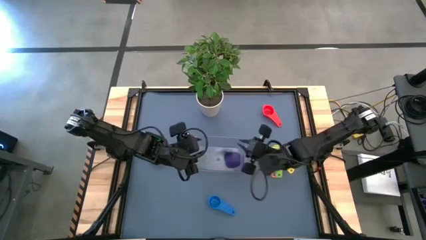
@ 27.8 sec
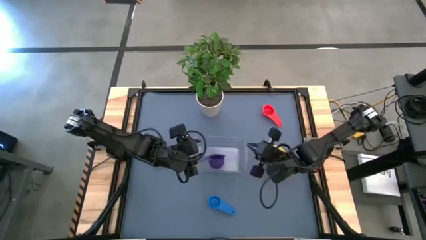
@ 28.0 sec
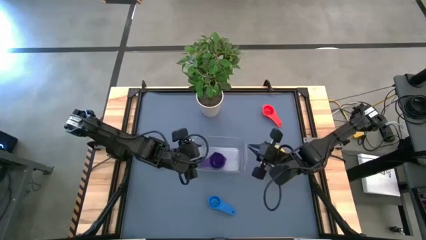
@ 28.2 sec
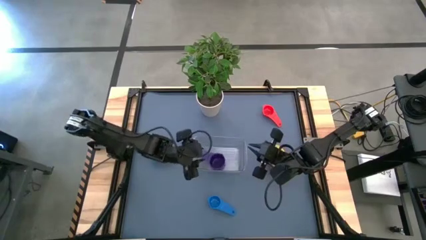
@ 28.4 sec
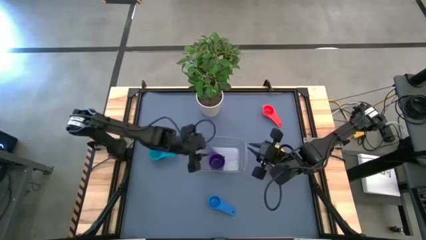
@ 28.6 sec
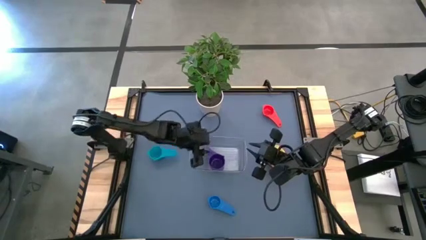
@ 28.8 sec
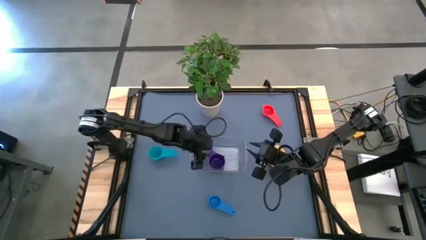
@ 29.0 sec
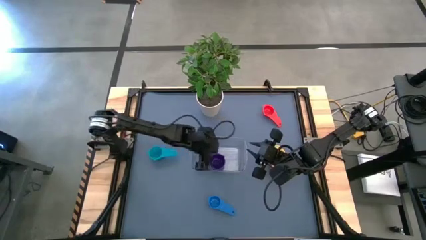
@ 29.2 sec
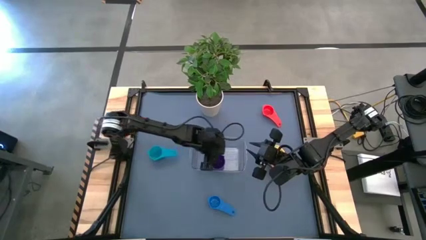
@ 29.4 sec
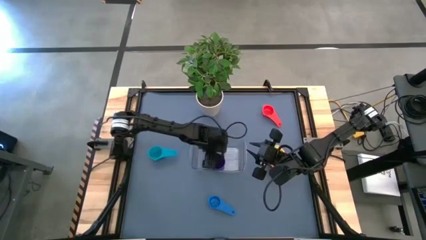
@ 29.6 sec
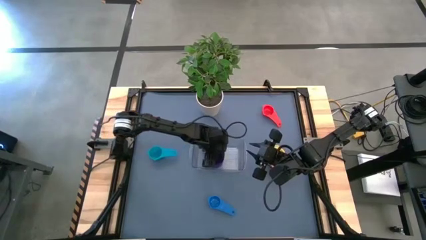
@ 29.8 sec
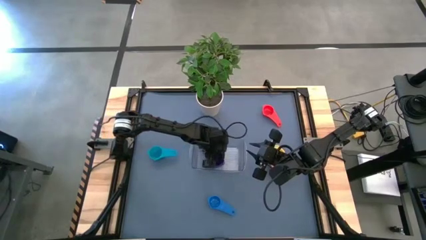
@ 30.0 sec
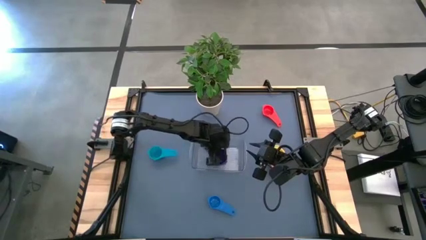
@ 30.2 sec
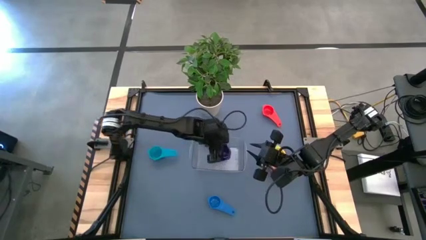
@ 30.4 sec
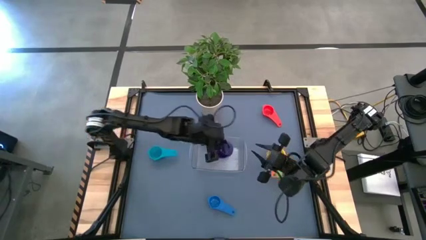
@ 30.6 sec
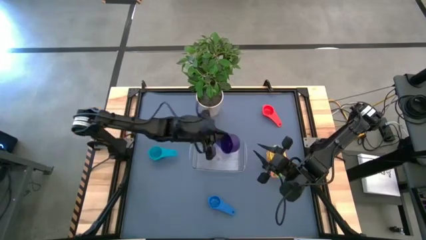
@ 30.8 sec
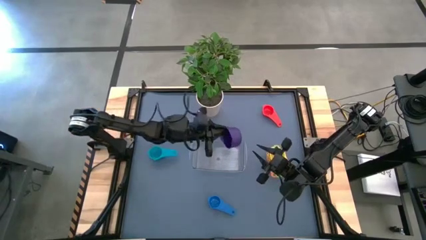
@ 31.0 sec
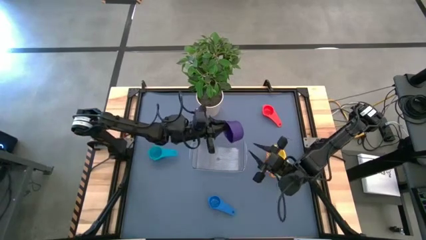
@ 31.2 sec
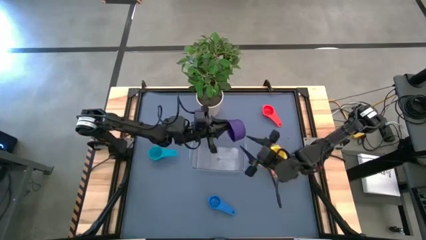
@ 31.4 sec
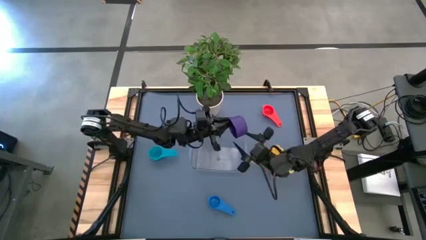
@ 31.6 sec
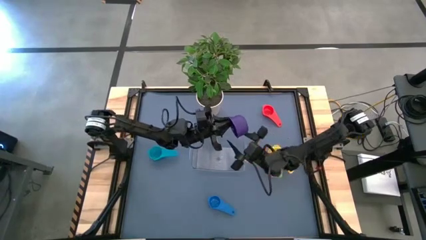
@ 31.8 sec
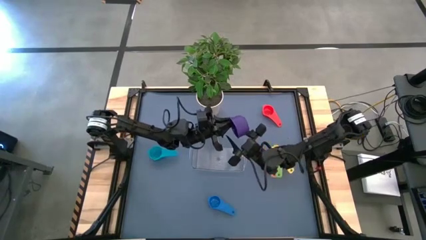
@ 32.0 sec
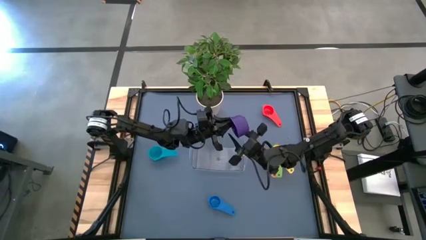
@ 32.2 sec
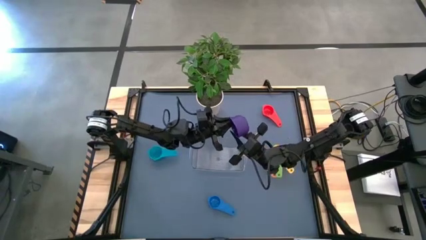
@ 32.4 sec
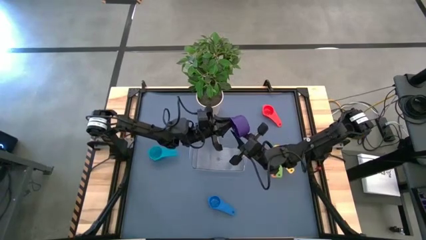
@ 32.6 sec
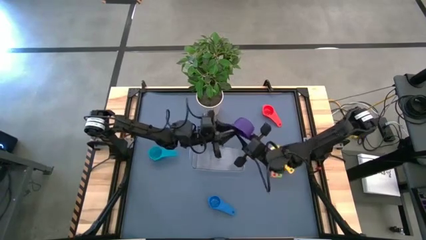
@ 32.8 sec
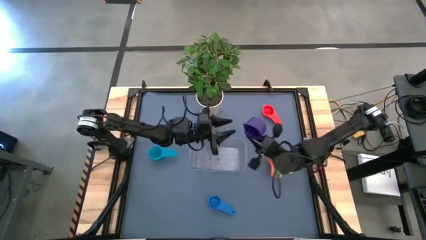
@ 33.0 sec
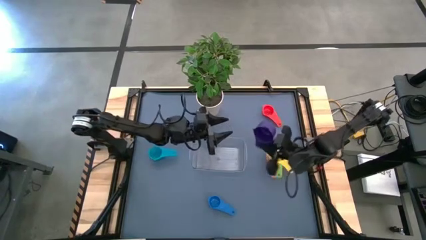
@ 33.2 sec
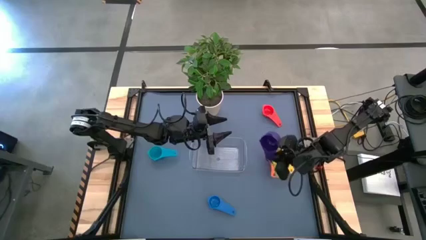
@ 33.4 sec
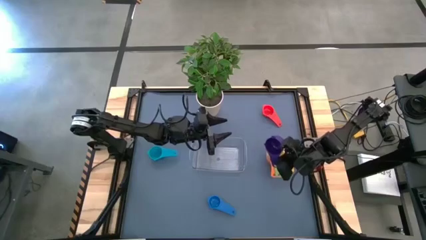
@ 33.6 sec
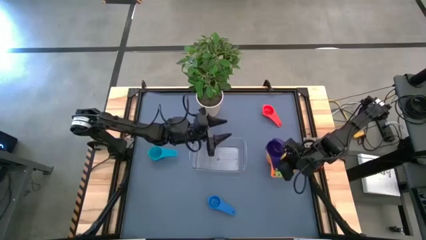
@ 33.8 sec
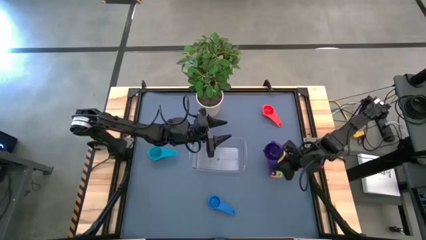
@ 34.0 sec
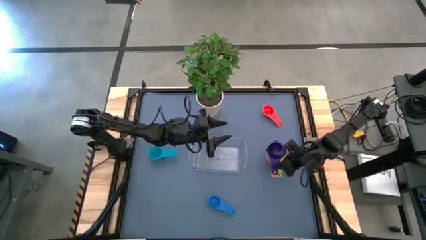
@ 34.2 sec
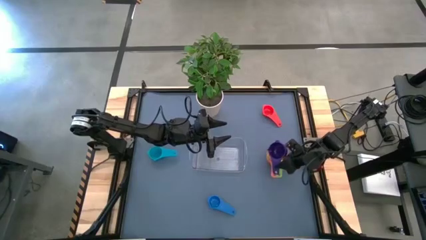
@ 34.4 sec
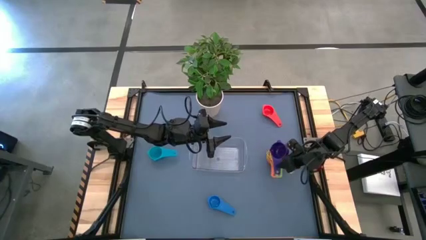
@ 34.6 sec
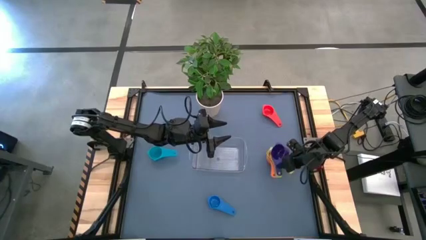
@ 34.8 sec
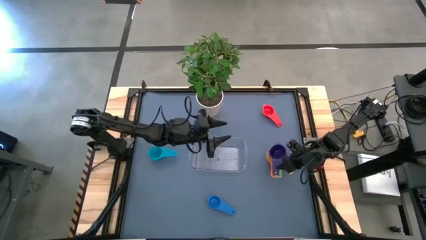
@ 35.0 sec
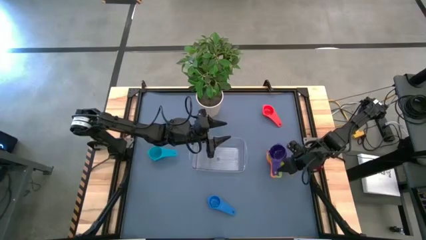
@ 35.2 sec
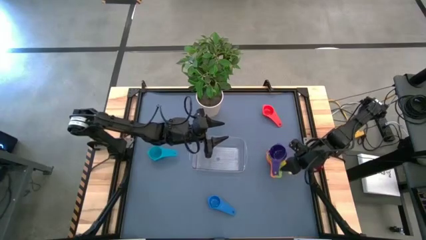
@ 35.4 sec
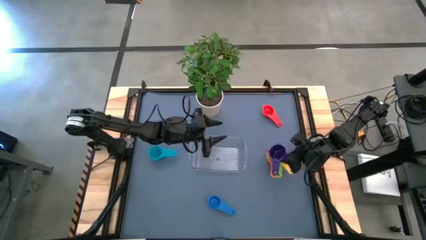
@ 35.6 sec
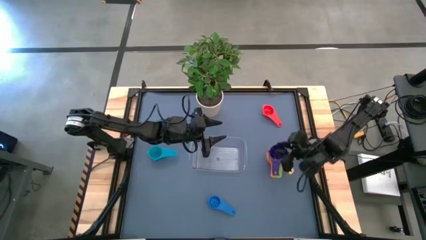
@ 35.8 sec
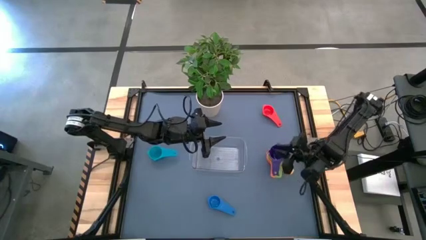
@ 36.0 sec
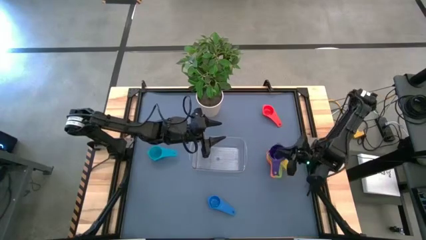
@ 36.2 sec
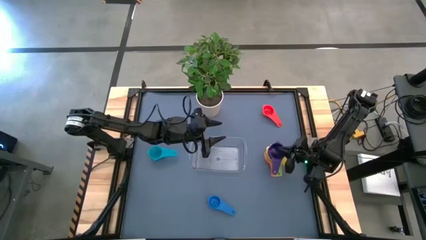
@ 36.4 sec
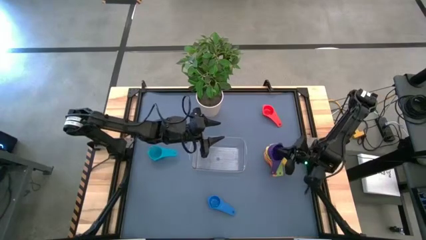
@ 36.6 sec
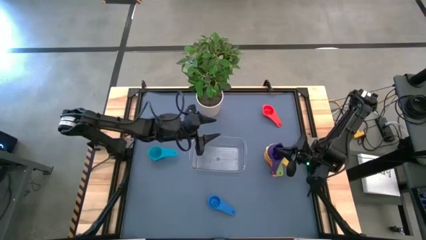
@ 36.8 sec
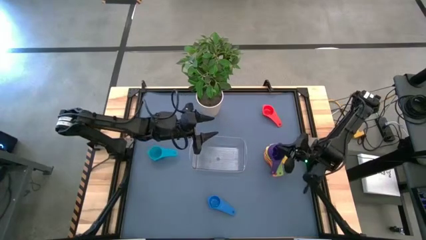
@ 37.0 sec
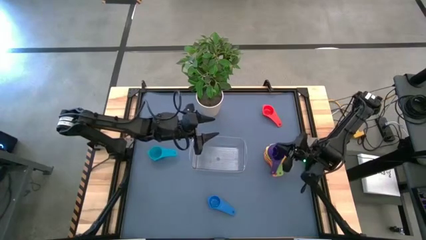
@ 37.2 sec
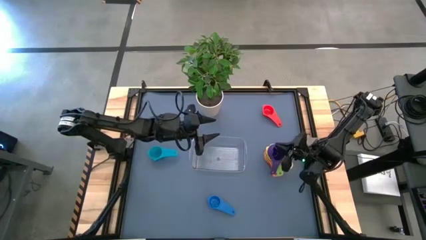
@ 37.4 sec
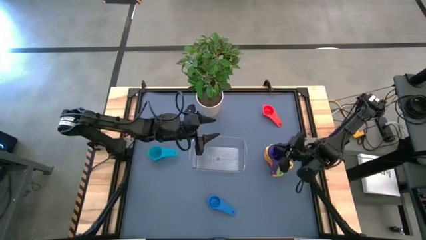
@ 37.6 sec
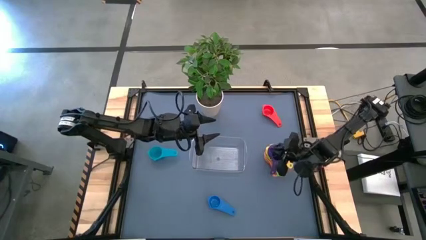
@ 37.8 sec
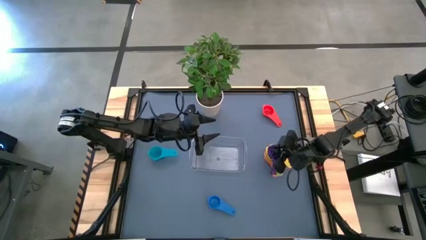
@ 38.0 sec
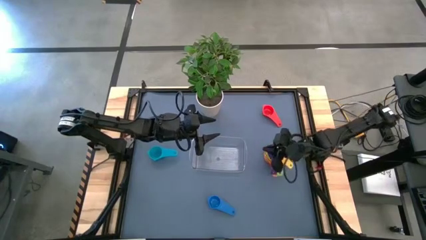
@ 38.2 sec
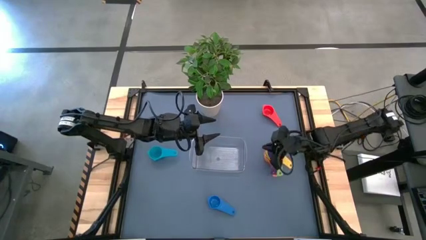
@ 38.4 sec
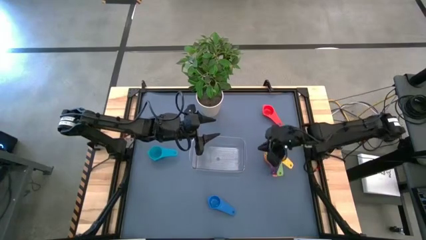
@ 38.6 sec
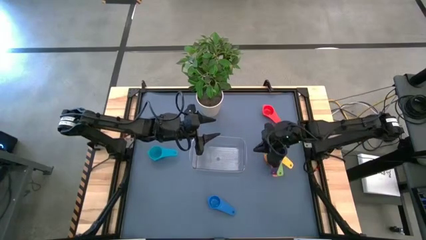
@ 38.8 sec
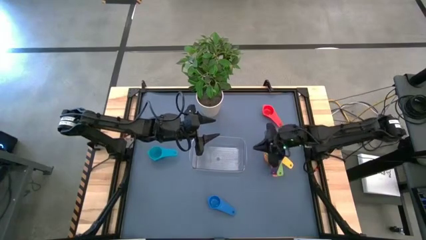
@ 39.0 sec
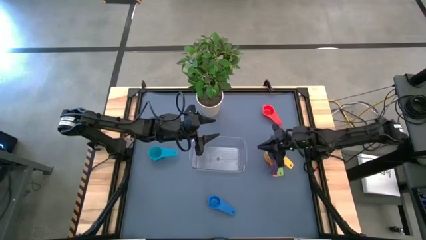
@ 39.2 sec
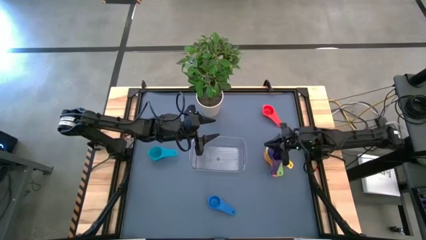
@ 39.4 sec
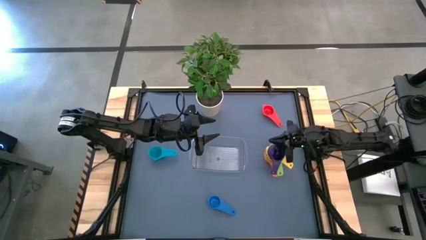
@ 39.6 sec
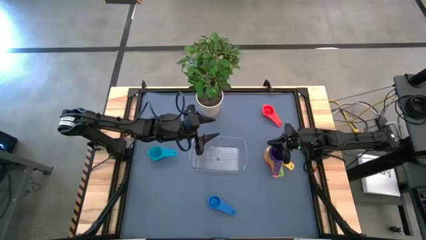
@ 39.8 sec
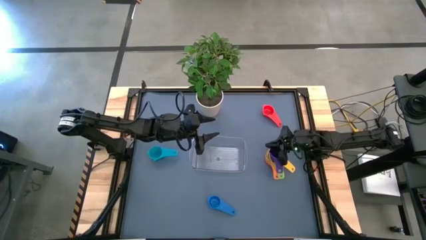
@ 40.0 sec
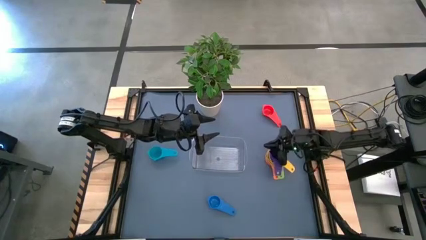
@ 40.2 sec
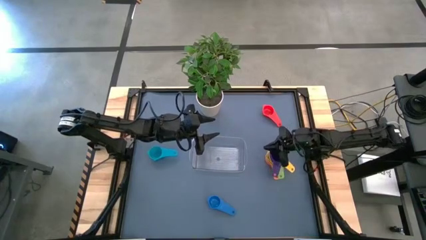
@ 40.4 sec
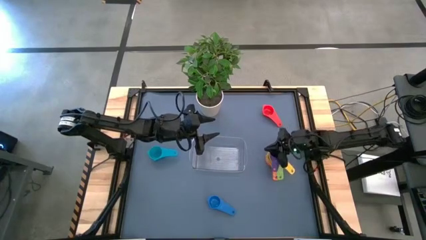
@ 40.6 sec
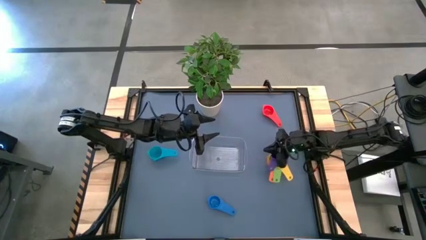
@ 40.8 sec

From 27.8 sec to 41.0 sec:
Task: Nest measuring cups in basket
Stack the violet measuring cup on top of the green measuring cup

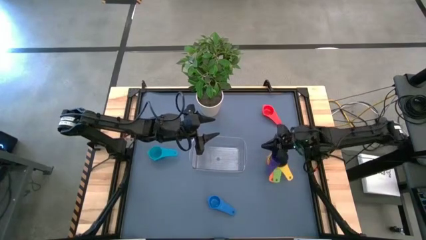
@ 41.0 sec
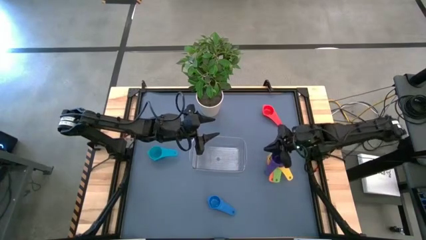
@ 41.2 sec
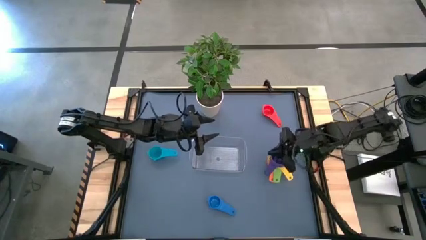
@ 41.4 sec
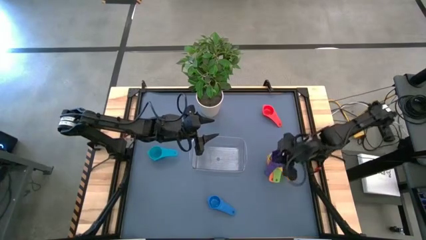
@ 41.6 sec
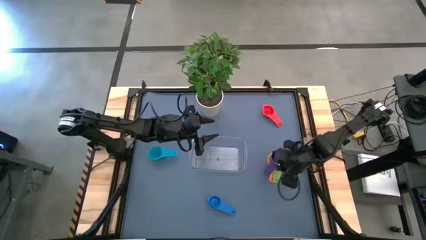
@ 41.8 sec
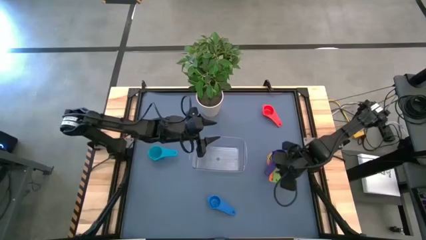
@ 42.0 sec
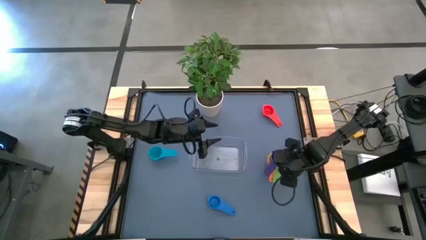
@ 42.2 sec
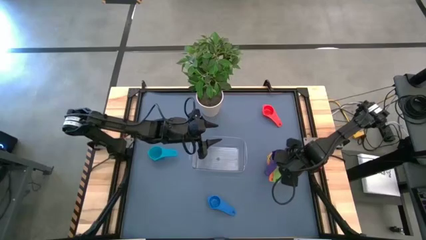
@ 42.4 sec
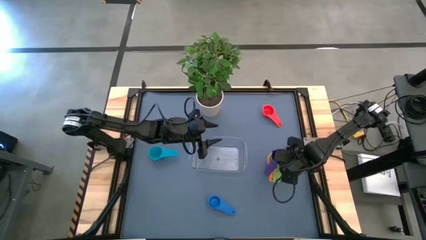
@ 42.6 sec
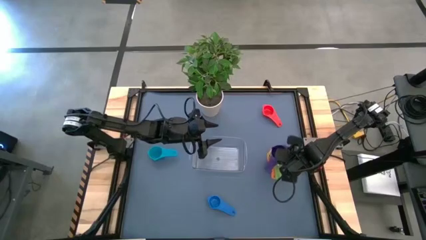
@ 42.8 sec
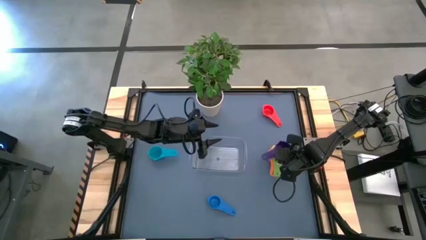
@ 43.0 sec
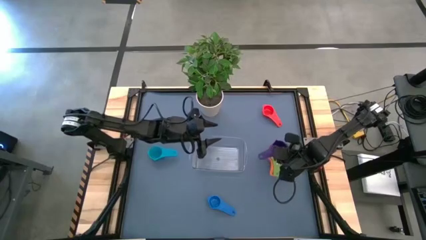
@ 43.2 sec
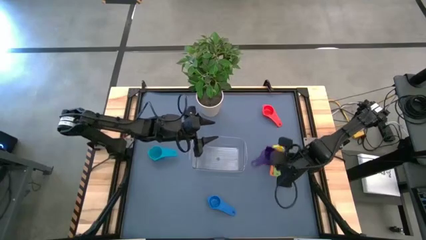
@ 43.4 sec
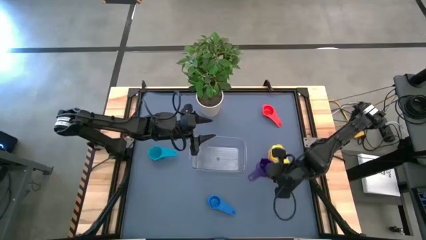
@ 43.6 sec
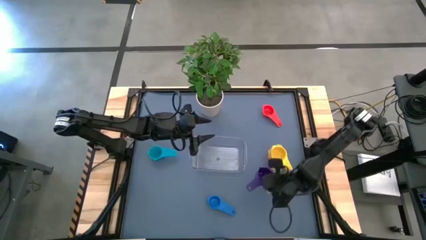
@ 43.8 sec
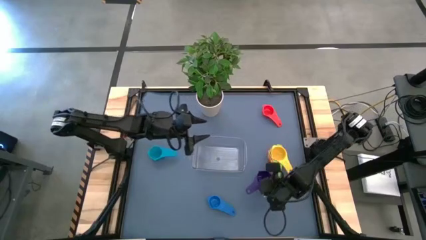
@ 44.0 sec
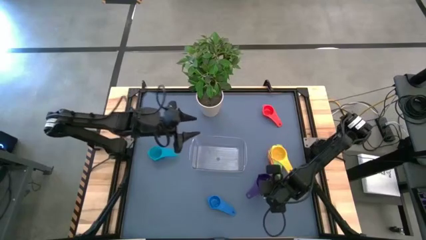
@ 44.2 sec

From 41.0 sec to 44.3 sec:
Remove the violet measuring cups from the yellow measuring cup

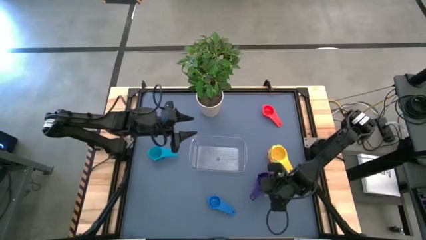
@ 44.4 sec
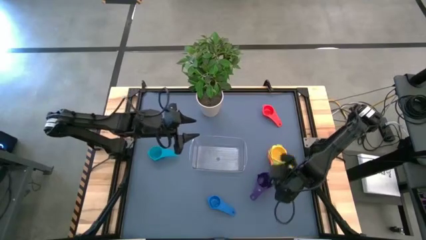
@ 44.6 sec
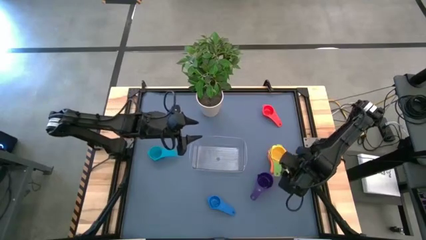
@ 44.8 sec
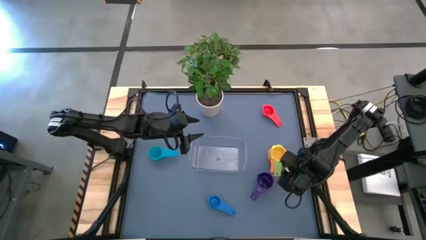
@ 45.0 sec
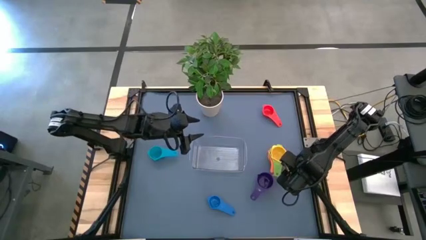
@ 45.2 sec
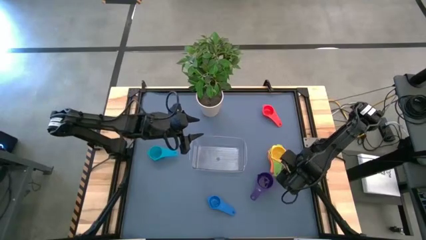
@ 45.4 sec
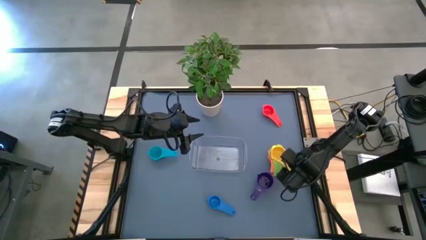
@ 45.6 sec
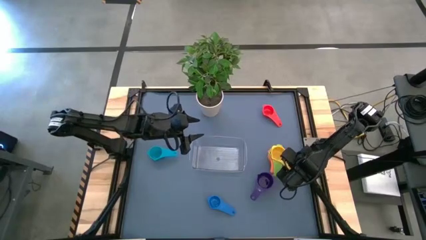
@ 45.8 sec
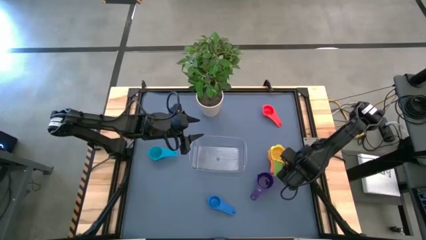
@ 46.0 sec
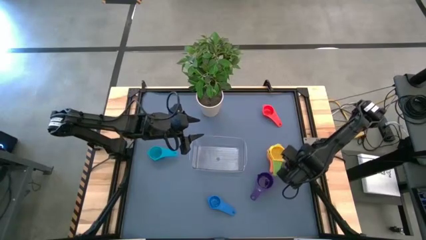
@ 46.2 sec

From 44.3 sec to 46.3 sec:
Remove the yellow measuring cup from the green measuring cup
